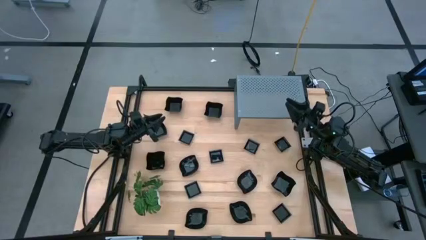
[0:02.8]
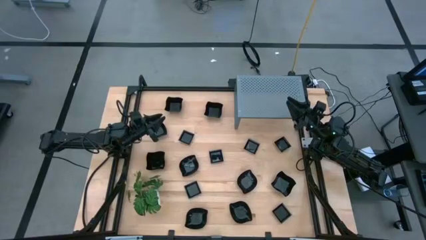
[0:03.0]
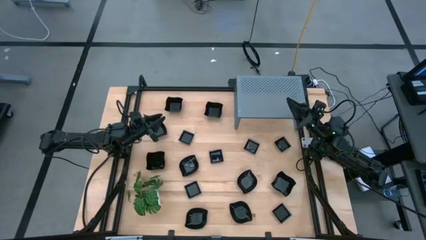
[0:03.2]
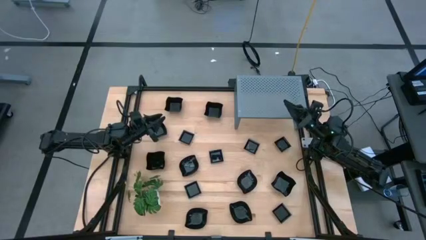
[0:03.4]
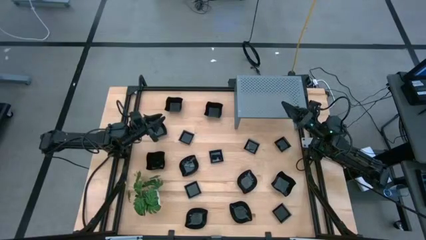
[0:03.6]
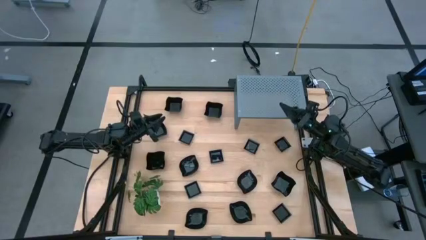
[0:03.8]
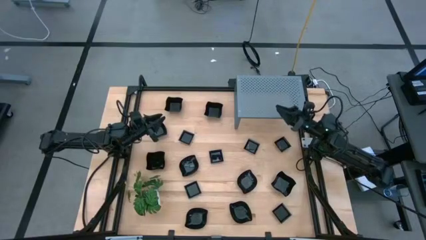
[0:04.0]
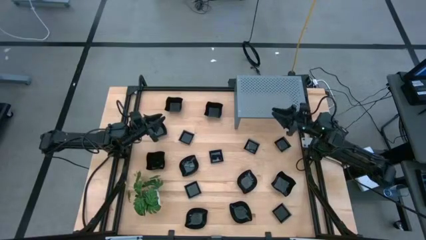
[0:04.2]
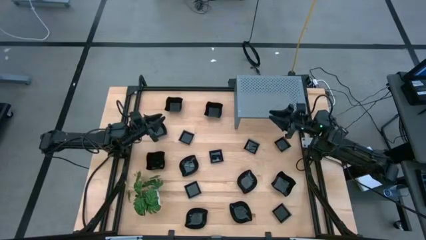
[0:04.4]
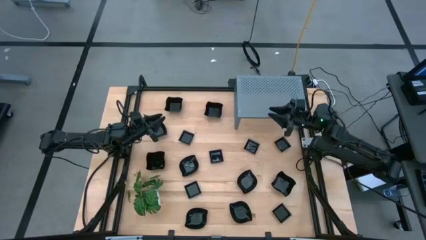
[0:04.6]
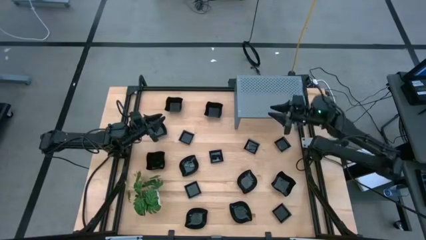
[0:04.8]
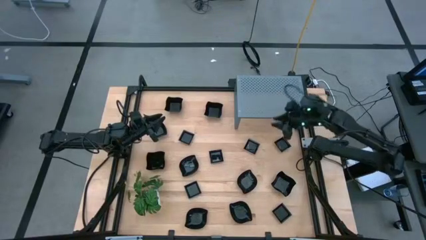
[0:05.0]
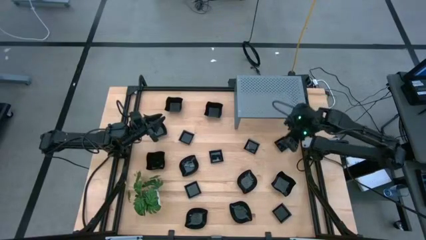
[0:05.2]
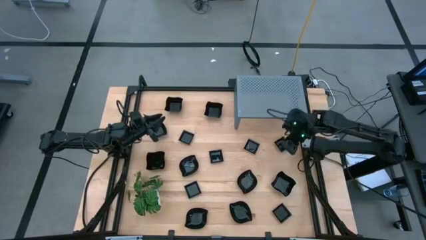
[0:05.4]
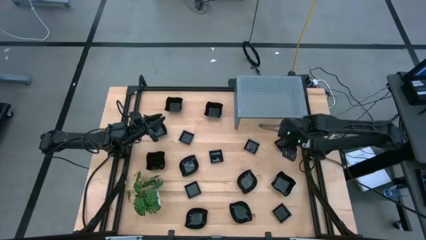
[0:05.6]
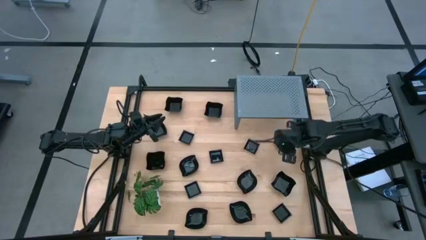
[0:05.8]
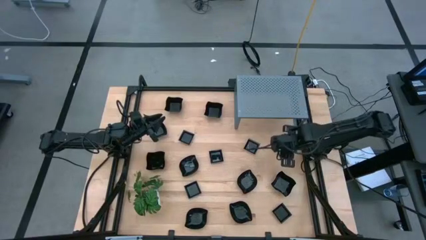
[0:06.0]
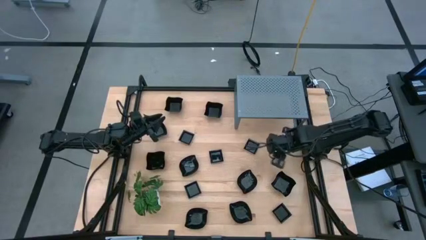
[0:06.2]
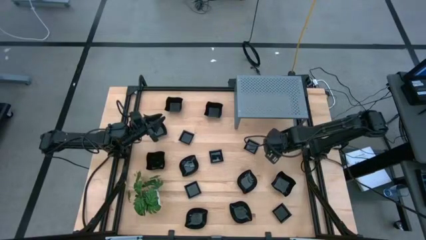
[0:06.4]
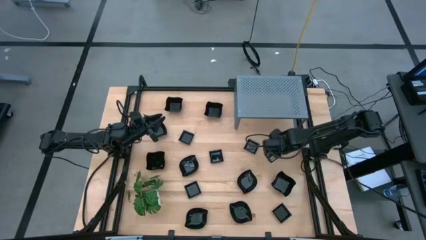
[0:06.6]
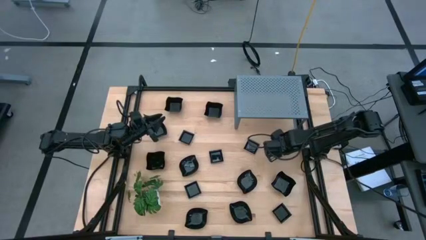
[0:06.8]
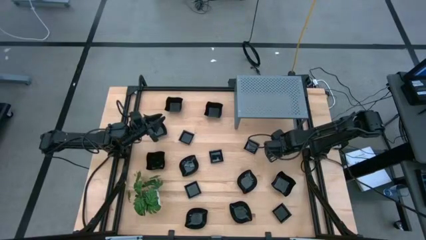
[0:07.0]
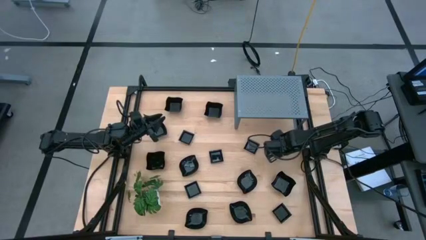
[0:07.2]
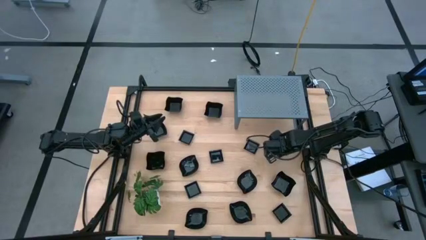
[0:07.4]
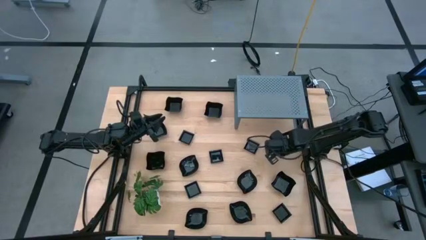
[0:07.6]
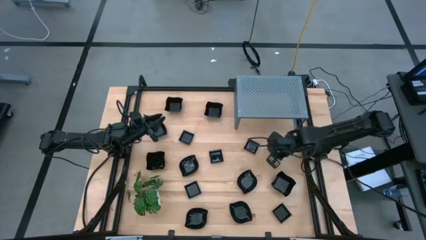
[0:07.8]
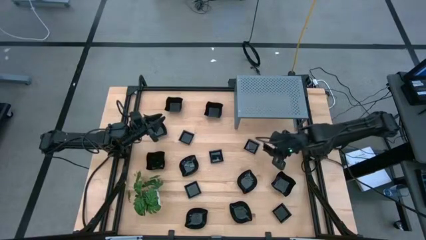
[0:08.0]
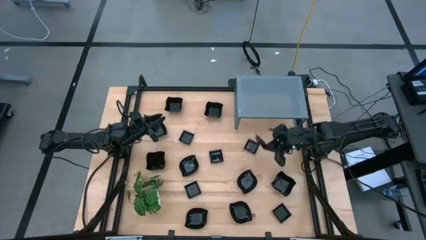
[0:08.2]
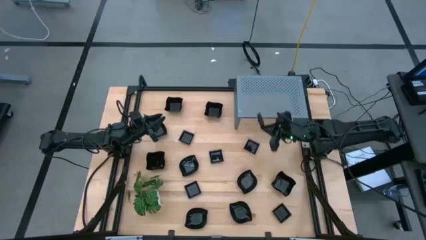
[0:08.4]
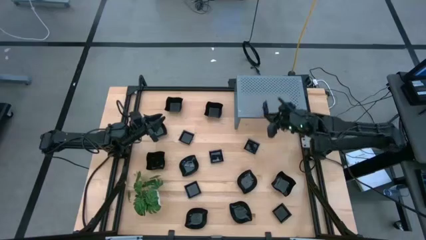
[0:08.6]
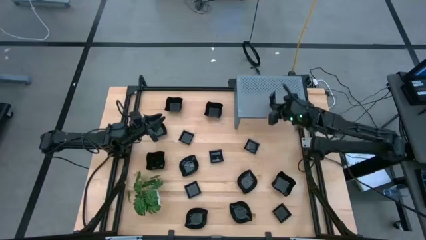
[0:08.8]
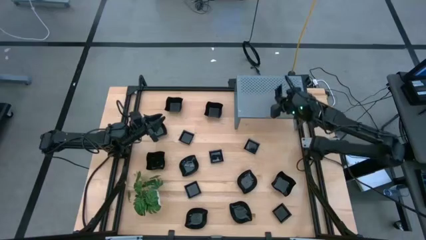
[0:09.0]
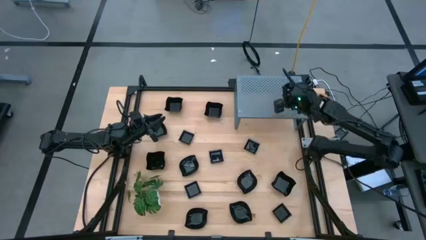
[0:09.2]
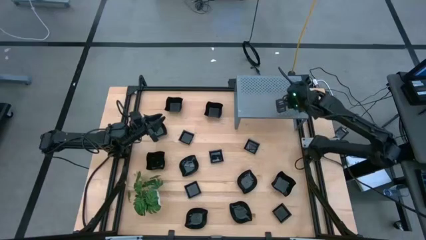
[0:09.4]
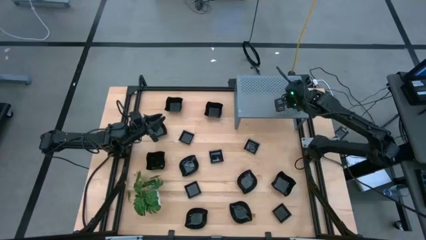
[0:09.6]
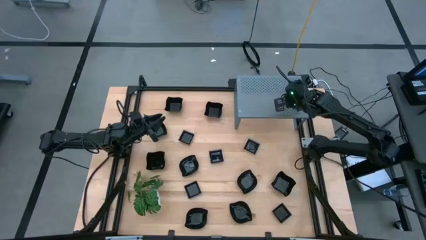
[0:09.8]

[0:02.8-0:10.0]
Task: Pick & Place Mini shaped plates
Put the black square plate on the shelf

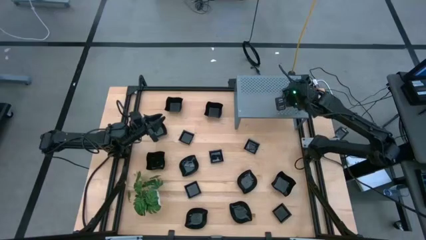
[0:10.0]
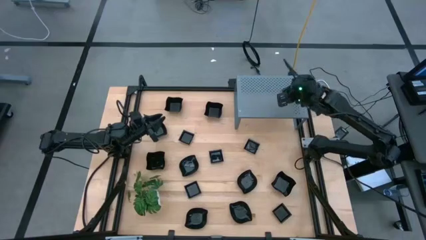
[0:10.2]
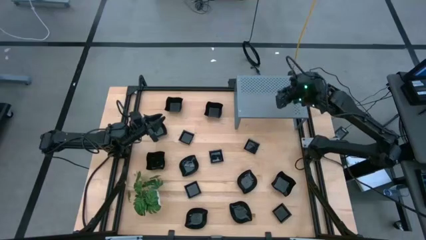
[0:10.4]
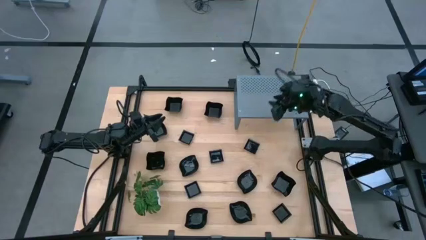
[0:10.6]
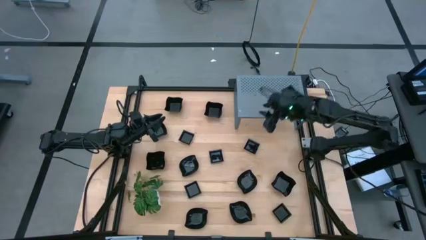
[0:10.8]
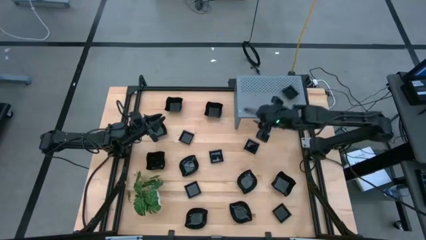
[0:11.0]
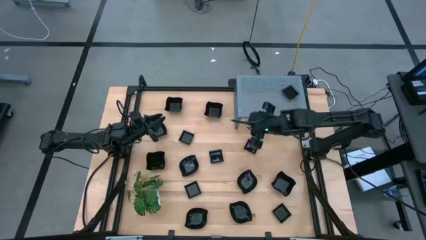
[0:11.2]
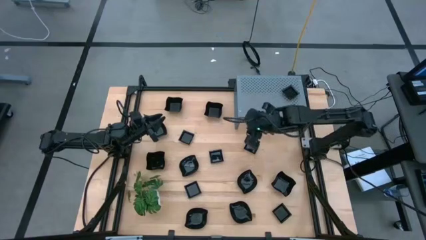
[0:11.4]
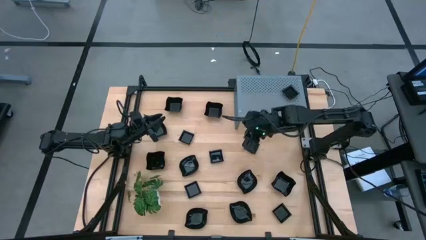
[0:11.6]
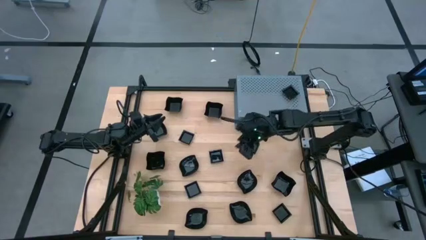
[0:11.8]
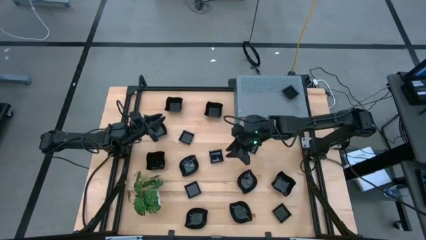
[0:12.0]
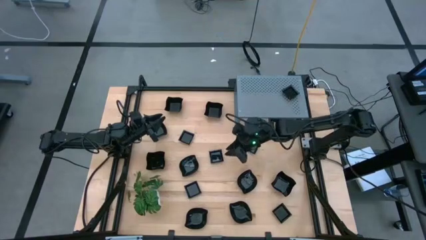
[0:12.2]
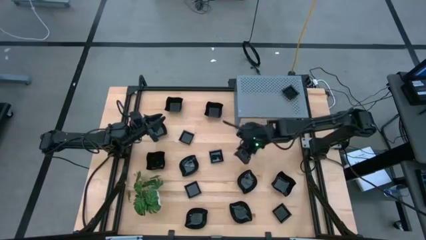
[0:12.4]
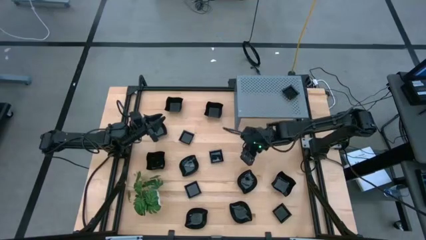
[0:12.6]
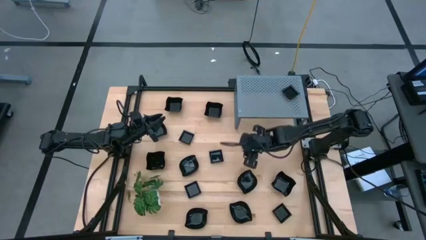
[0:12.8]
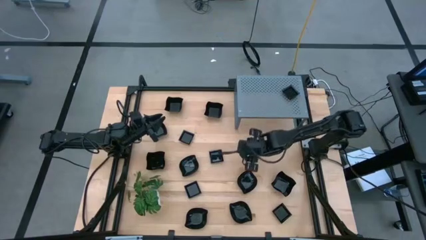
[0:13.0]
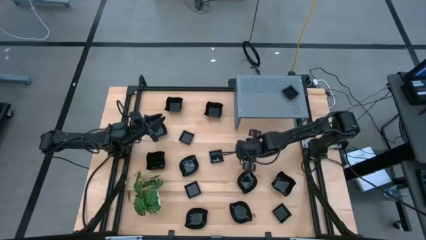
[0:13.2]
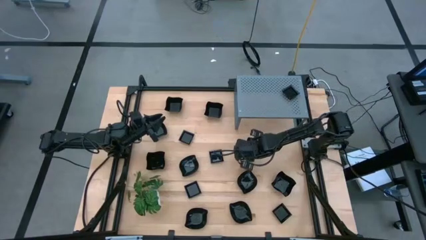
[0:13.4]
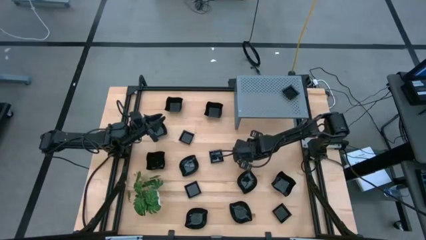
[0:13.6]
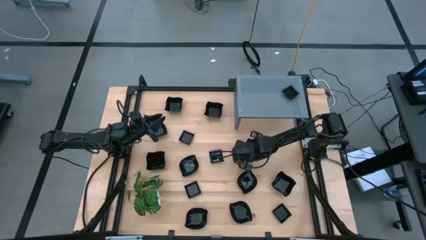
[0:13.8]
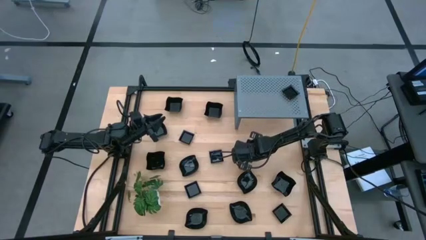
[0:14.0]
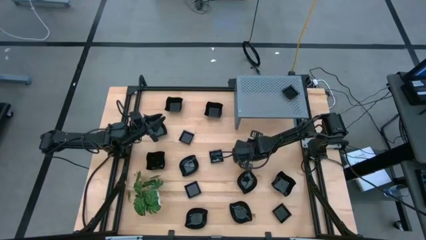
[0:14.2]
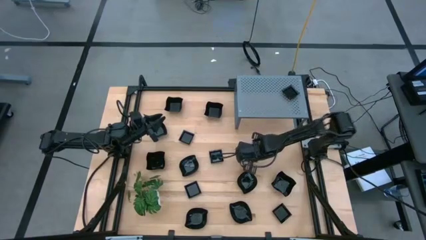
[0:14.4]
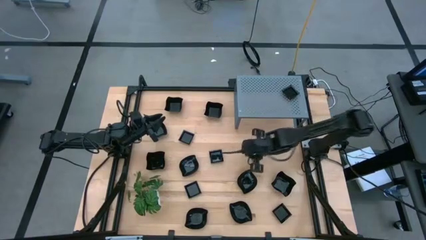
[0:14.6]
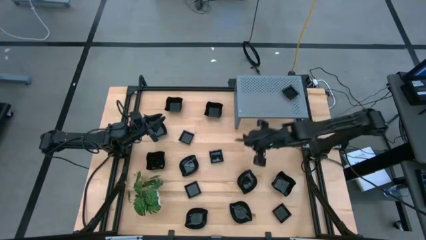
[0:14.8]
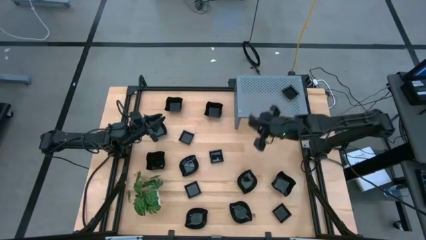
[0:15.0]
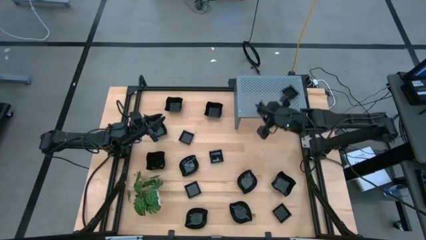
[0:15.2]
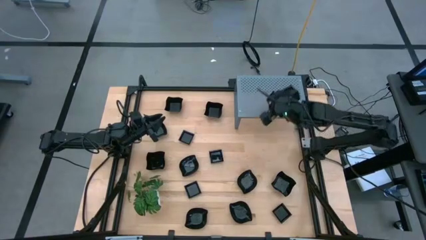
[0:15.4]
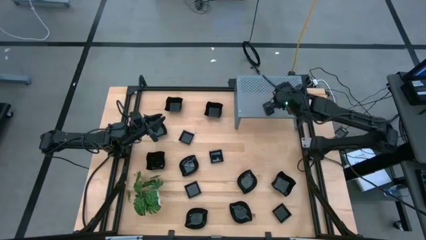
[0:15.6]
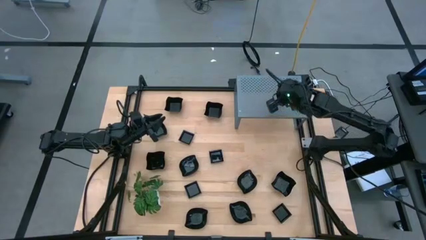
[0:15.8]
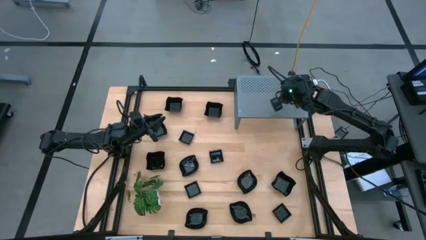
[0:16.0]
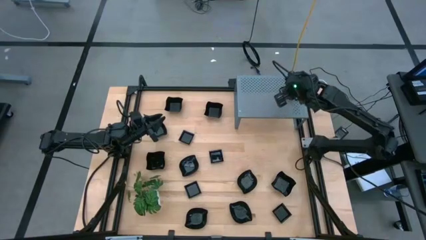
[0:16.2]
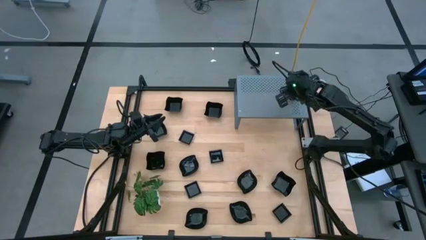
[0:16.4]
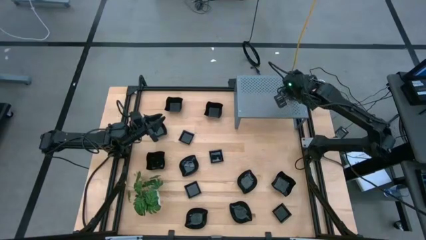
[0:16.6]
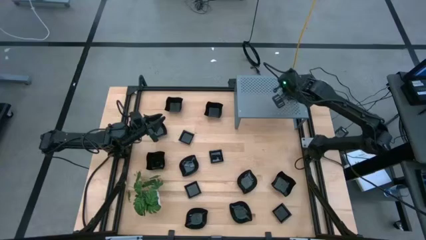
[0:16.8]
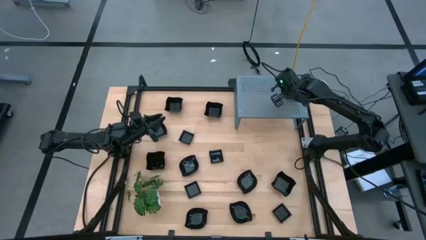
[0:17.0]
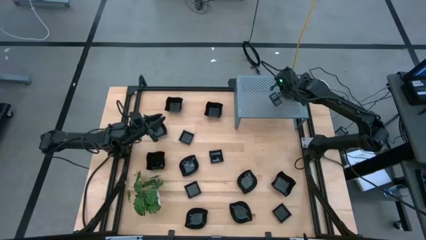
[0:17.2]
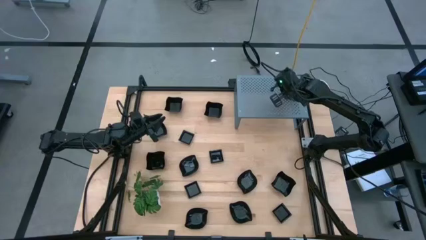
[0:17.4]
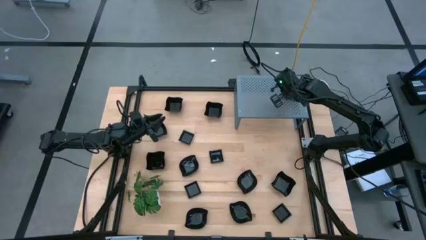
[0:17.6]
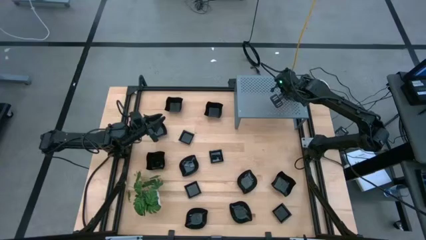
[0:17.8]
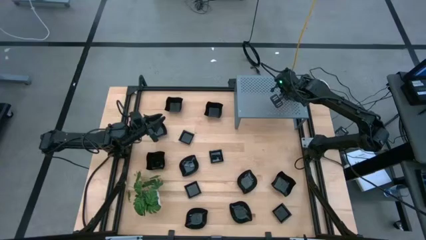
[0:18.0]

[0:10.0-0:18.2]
Stack the black square plate on the black square plate on the shelf
